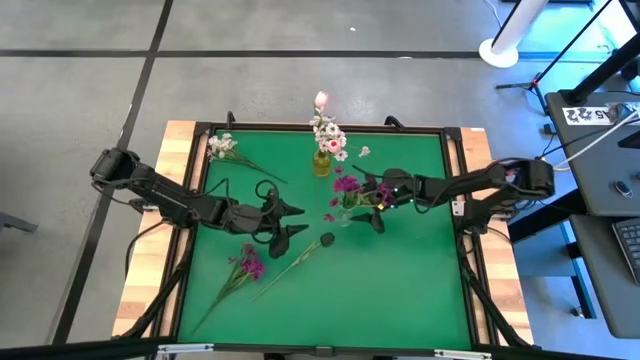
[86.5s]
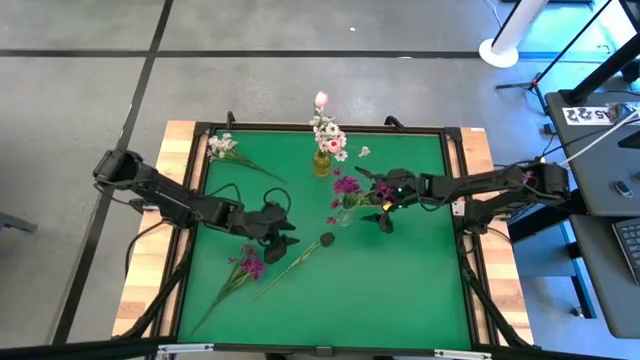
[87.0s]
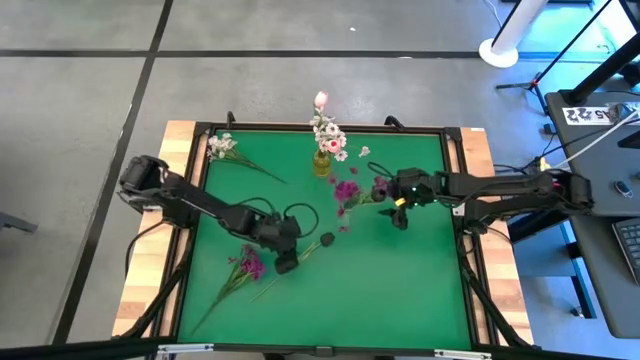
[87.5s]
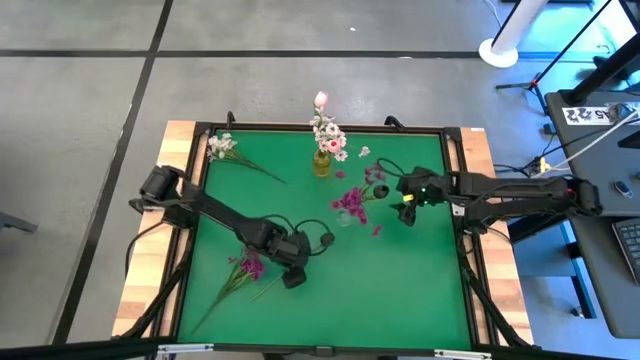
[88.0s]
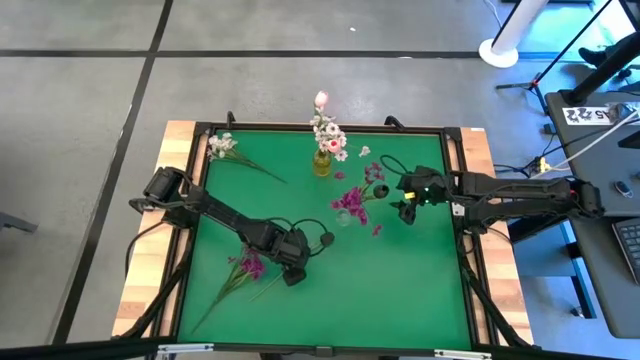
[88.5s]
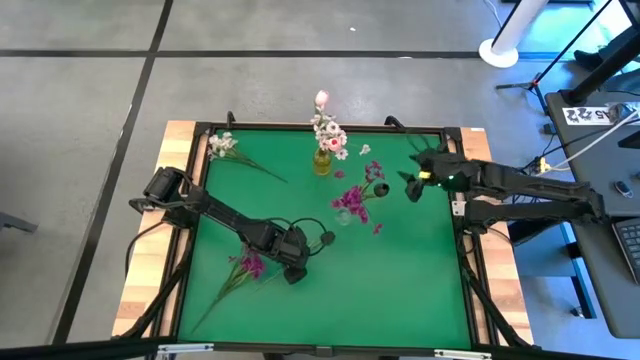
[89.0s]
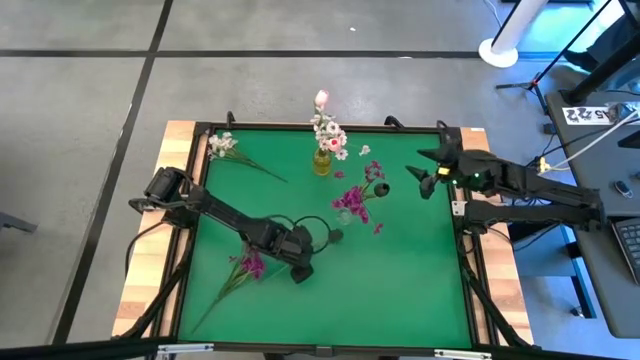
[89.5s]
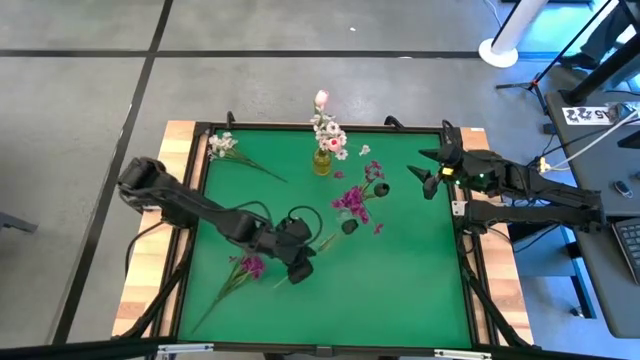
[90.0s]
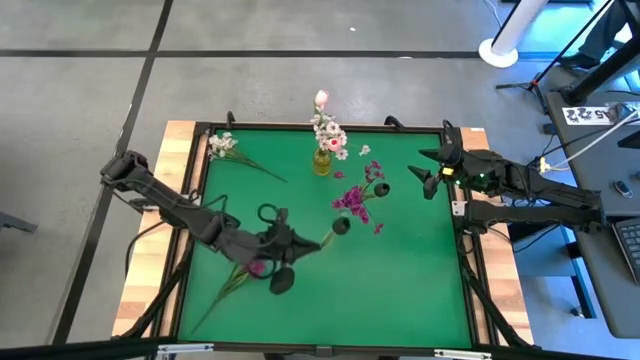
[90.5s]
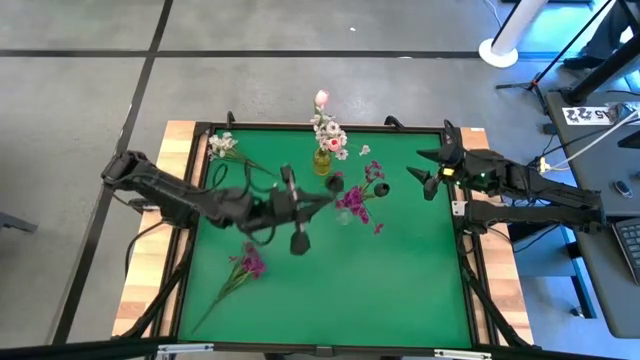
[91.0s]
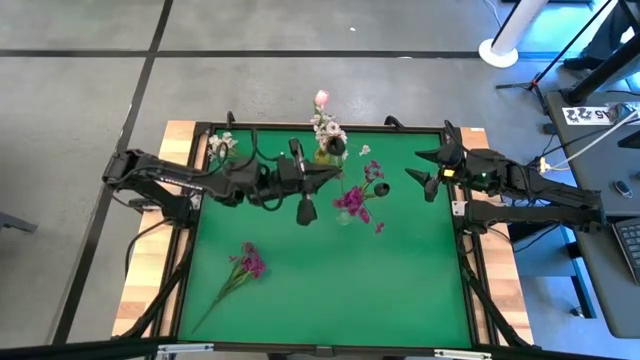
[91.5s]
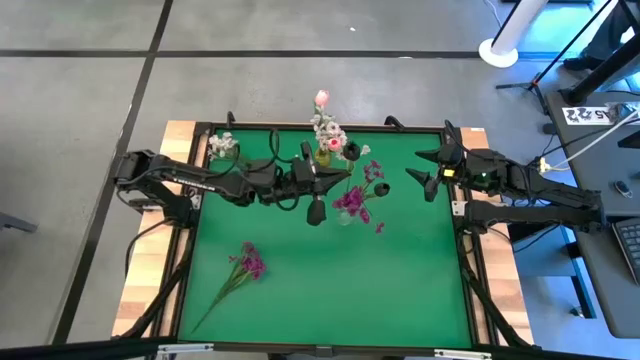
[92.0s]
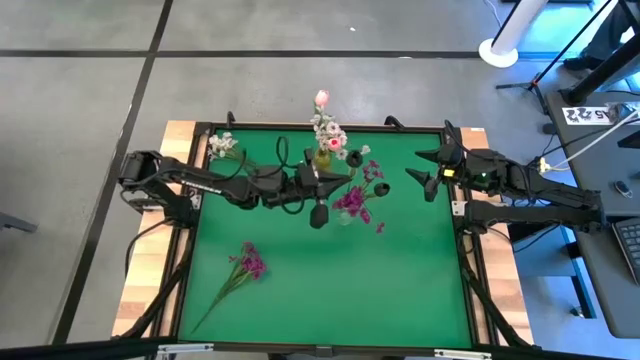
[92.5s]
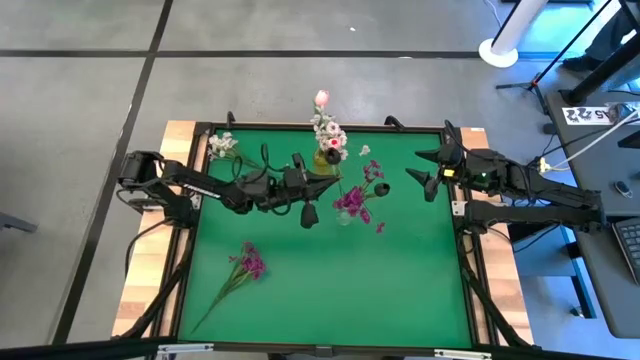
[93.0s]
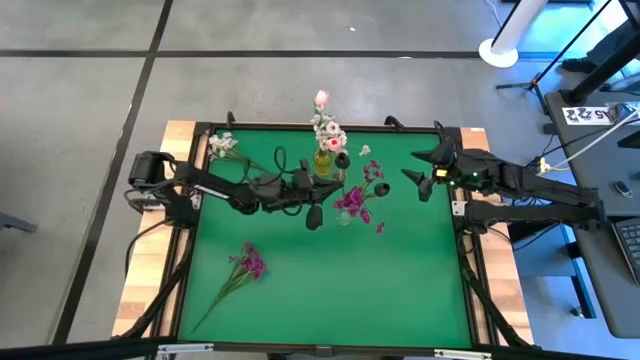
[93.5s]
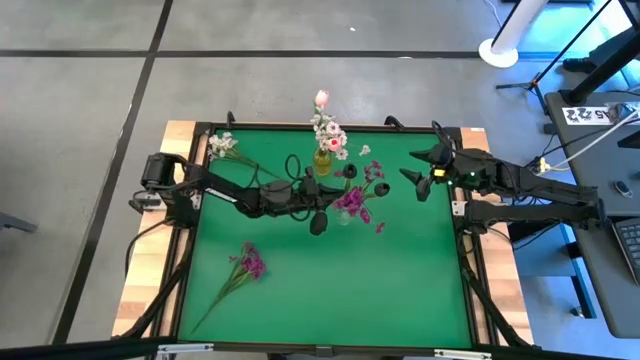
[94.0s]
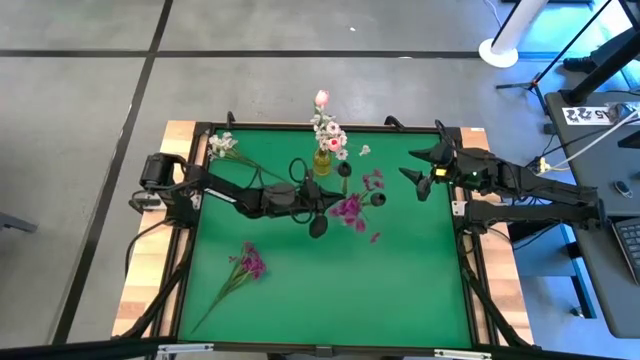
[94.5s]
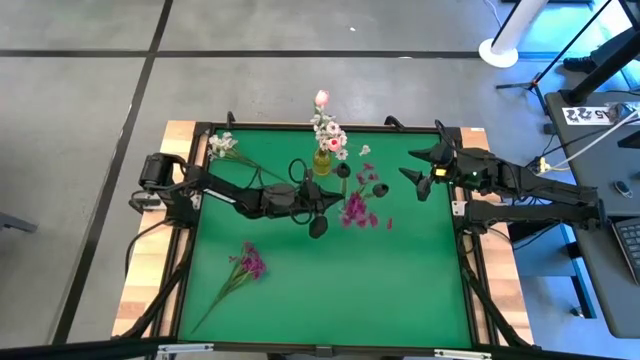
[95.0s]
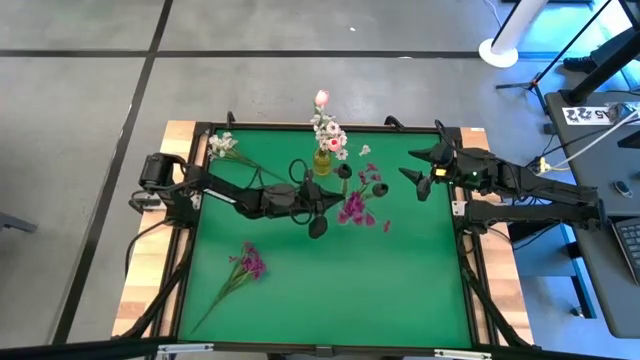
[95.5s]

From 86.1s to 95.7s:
Task: Sort flowers into vase by color
Put the black flower into the transparent vase

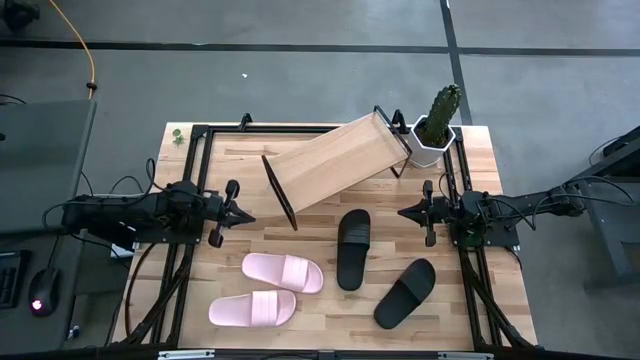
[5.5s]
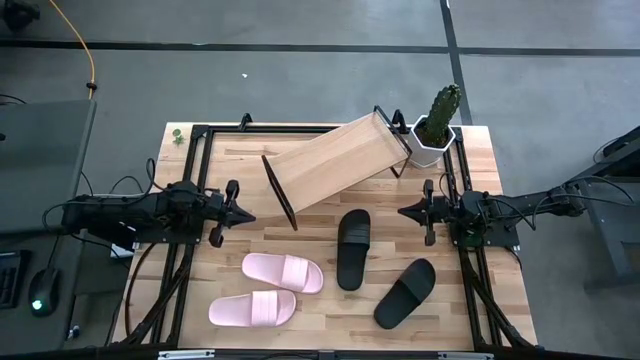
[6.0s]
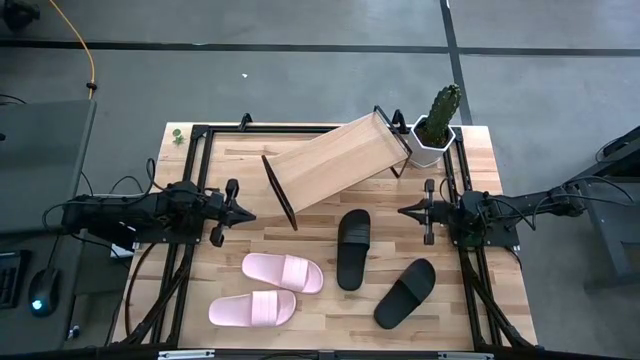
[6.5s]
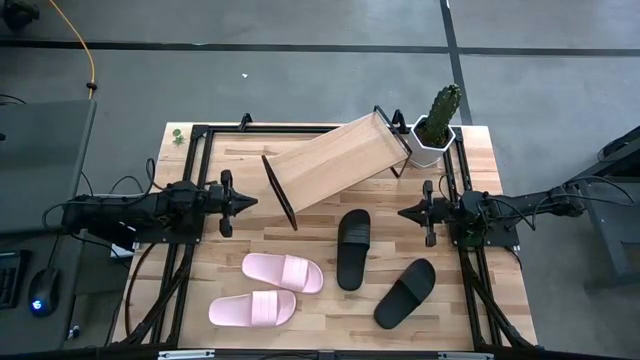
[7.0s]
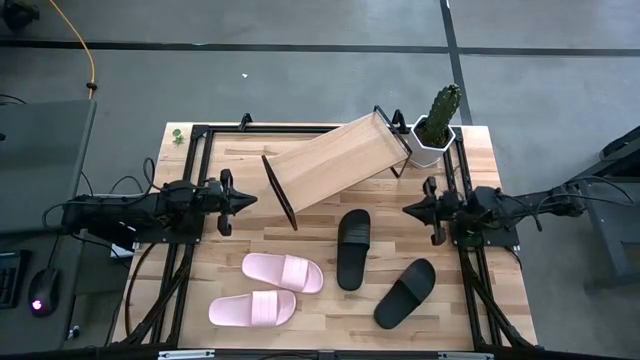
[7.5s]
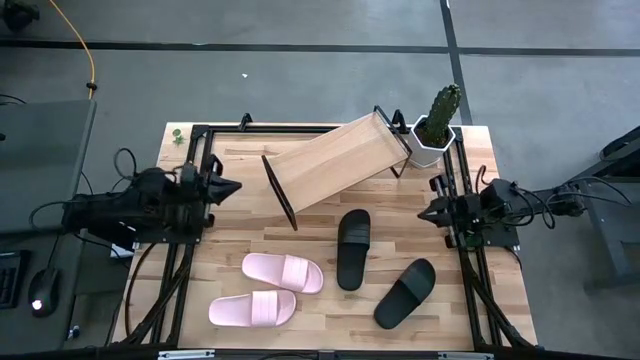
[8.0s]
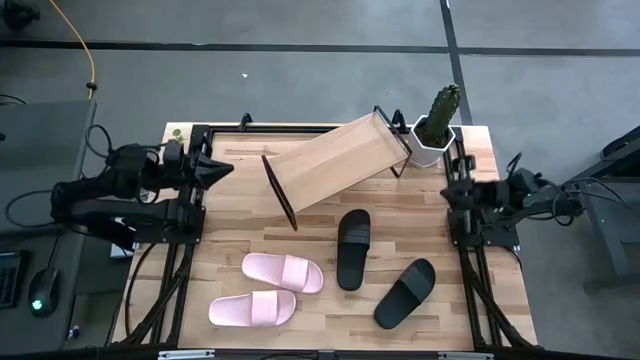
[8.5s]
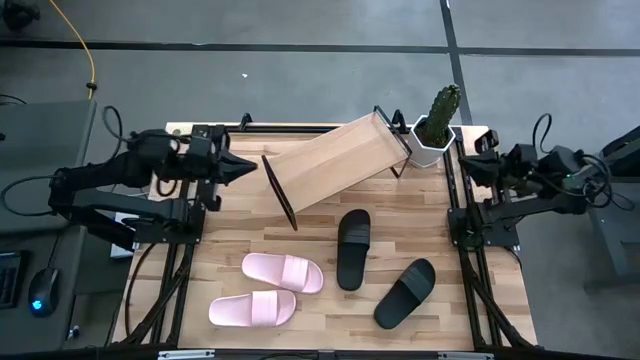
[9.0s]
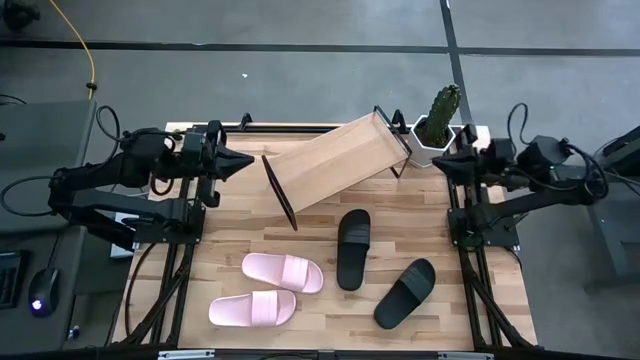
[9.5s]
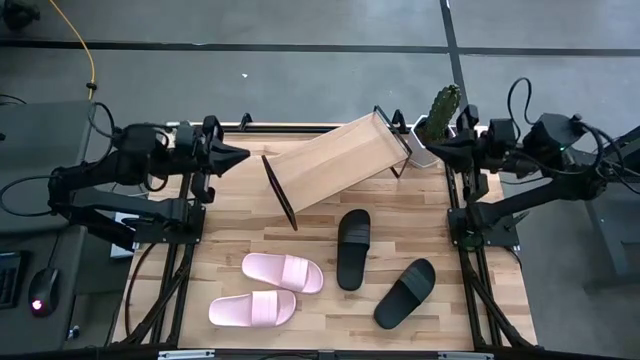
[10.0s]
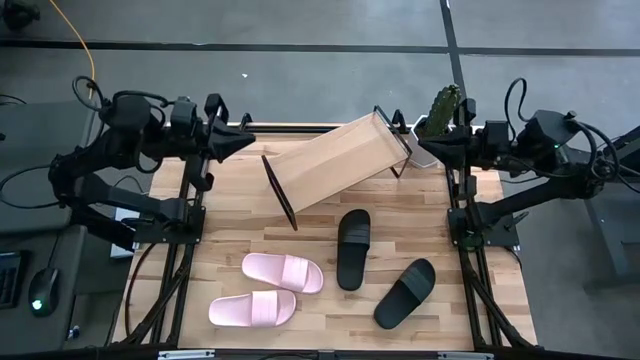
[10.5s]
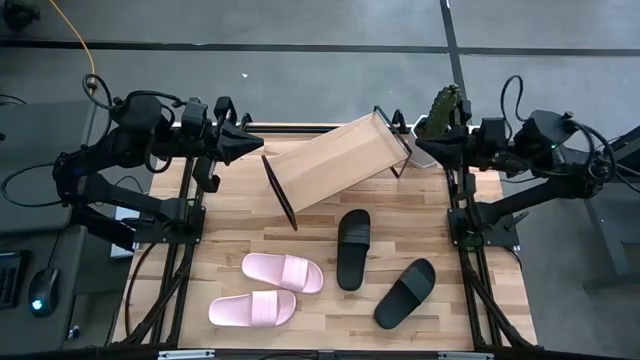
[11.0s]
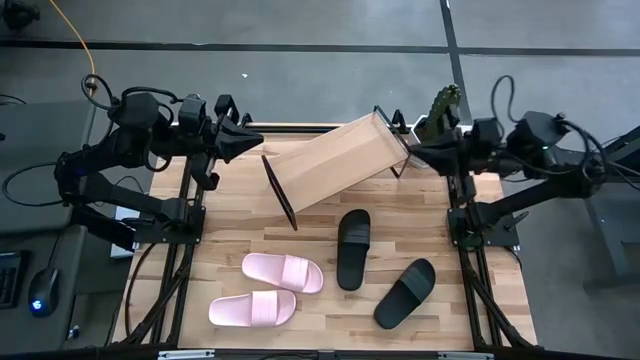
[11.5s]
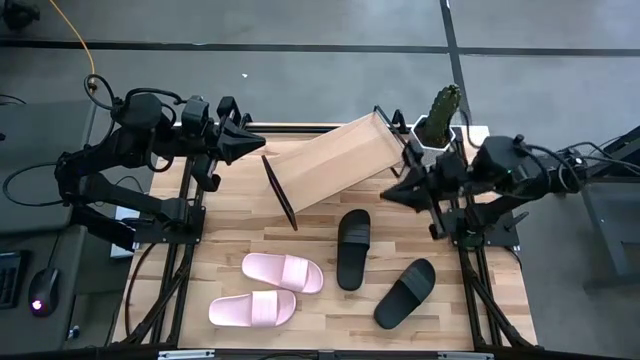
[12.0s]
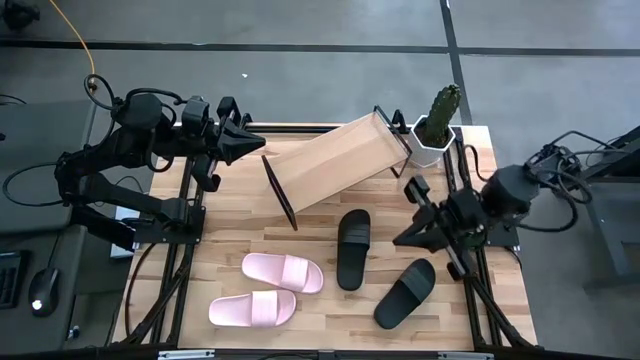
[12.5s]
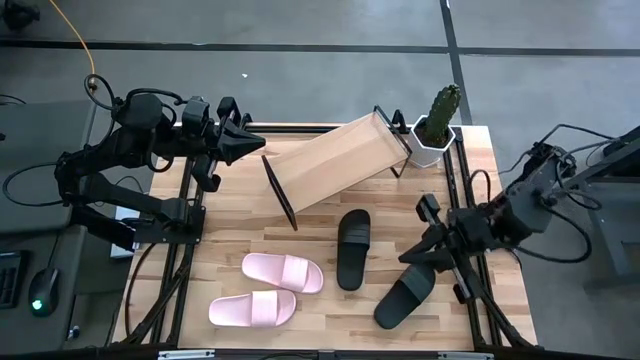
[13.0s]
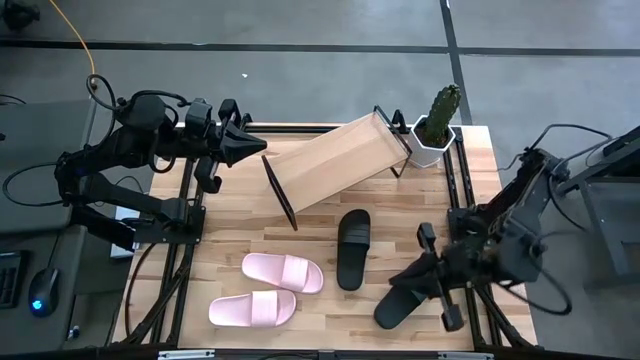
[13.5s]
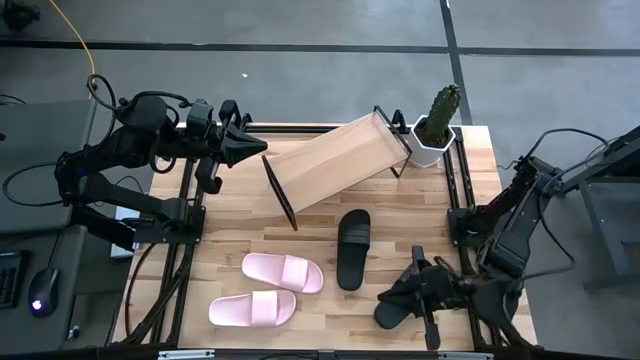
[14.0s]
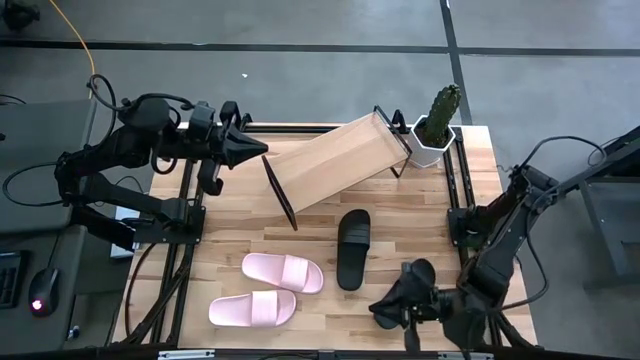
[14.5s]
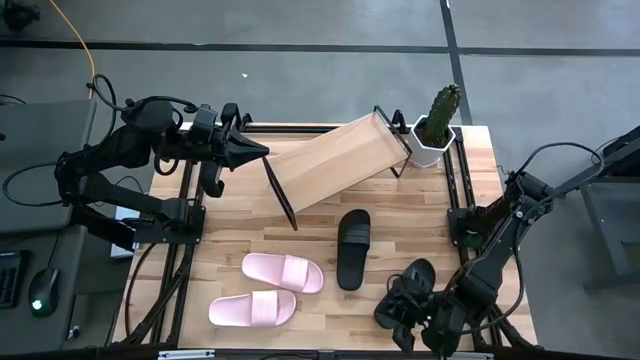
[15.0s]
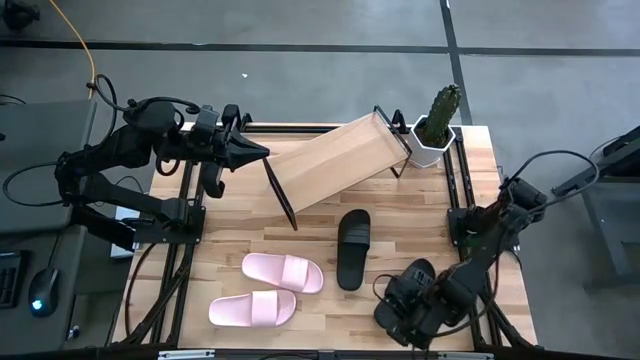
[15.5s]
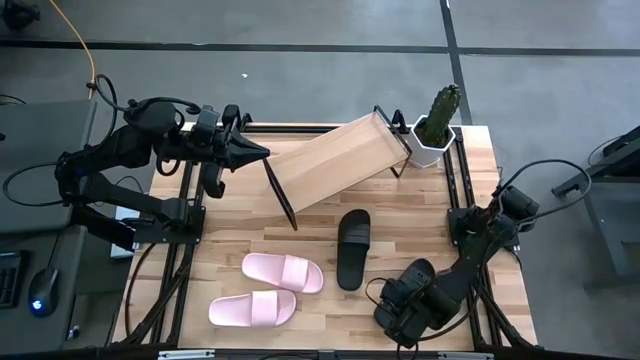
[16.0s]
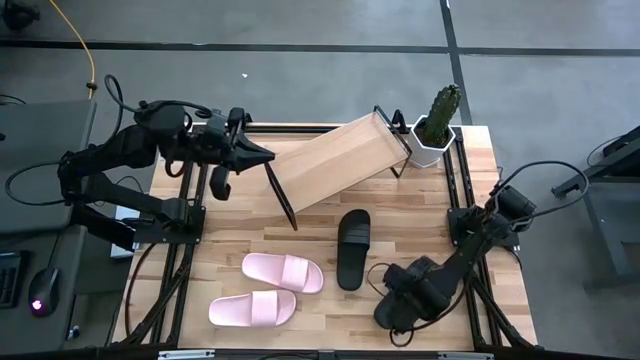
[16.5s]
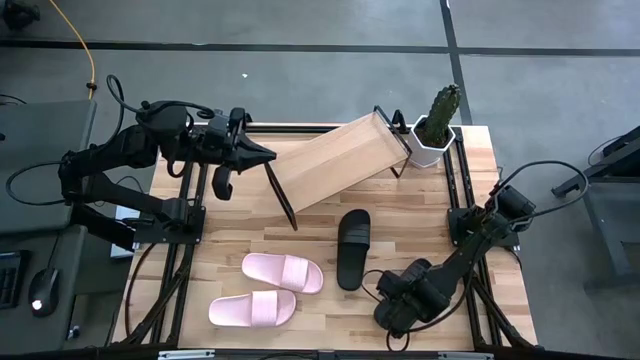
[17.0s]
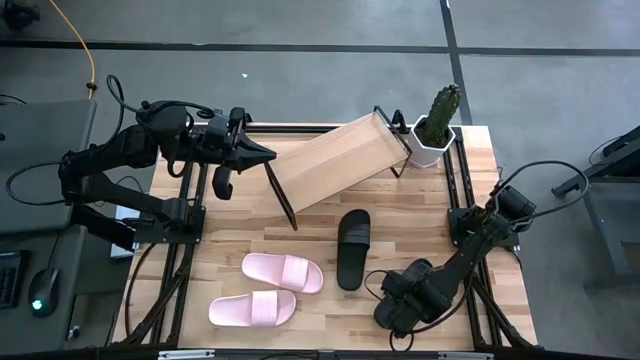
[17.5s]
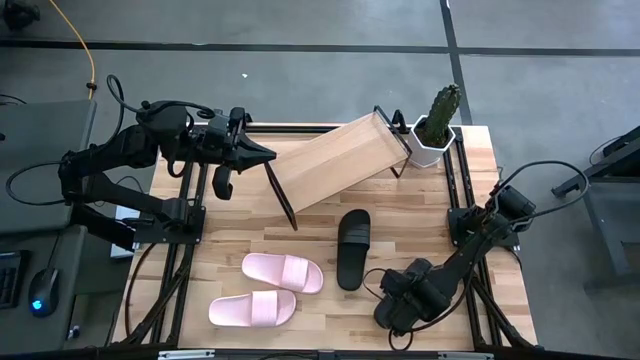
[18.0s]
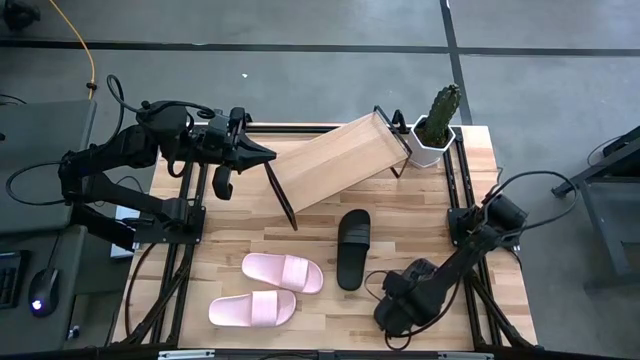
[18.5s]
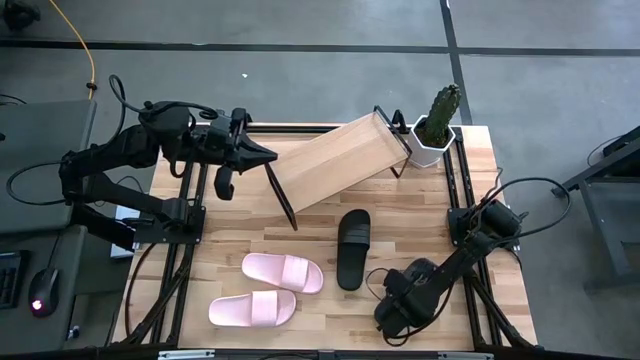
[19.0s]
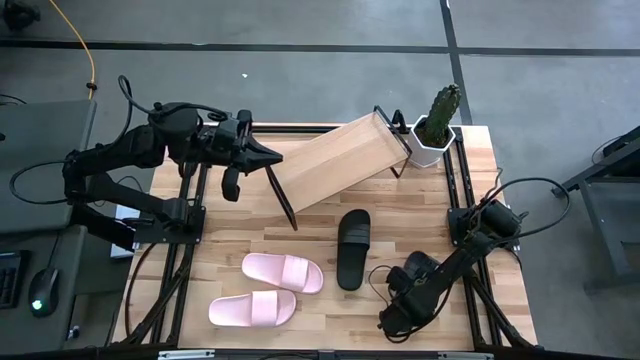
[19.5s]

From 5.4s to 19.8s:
Task: Pick and place slides into the shelf
Put the right black slide on the shelf
